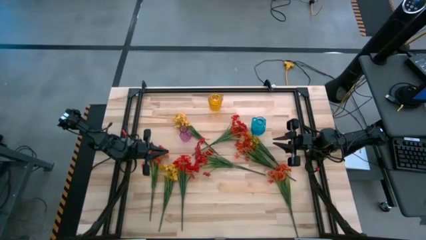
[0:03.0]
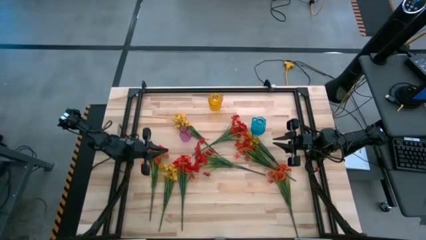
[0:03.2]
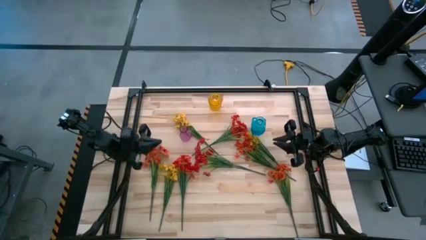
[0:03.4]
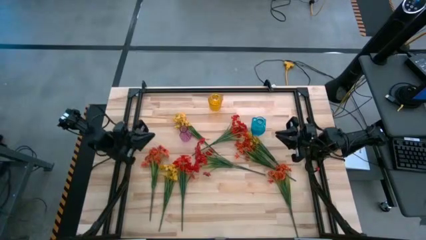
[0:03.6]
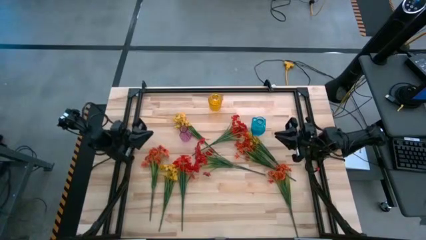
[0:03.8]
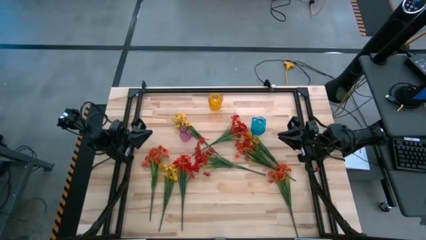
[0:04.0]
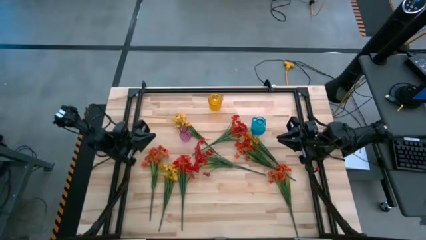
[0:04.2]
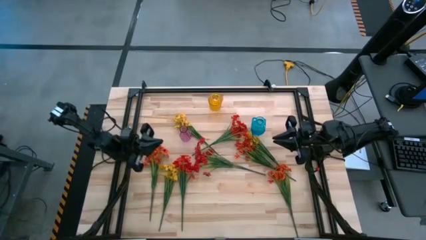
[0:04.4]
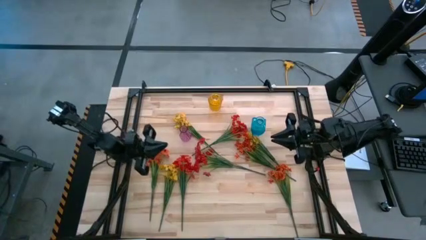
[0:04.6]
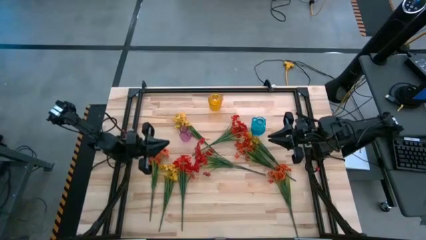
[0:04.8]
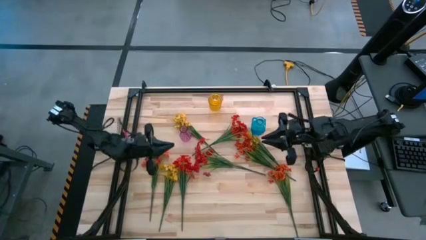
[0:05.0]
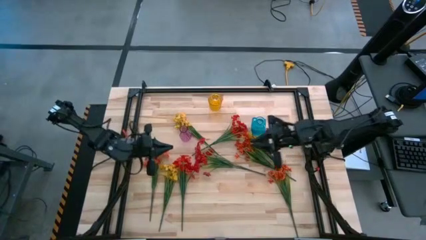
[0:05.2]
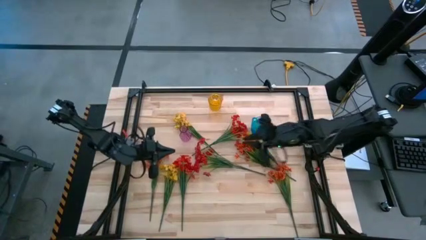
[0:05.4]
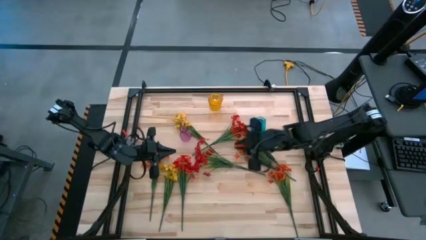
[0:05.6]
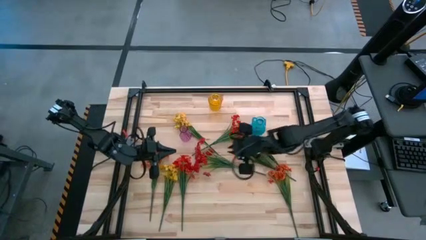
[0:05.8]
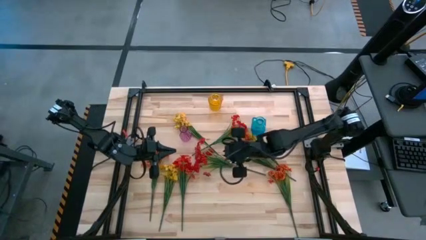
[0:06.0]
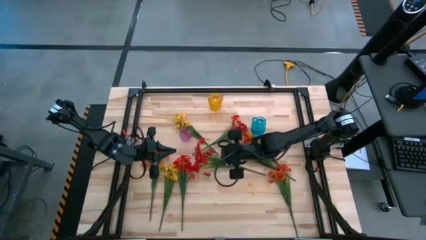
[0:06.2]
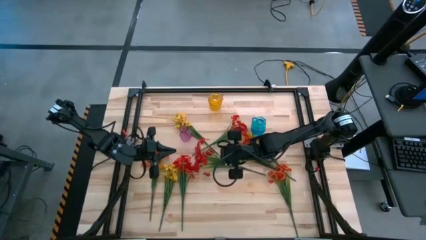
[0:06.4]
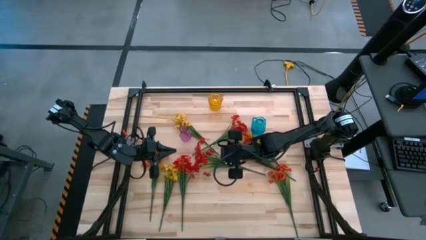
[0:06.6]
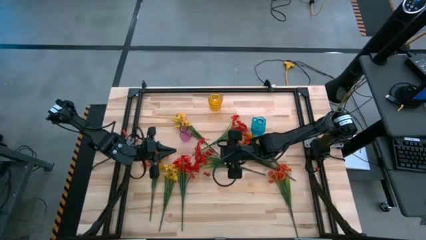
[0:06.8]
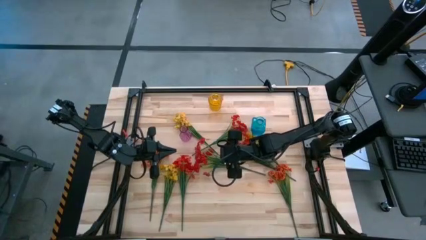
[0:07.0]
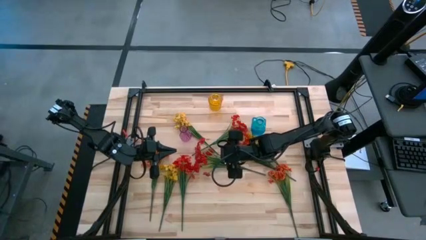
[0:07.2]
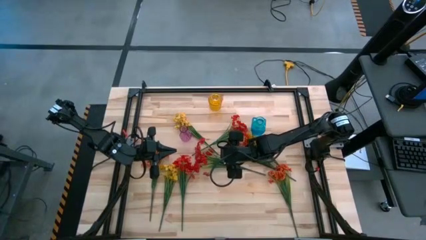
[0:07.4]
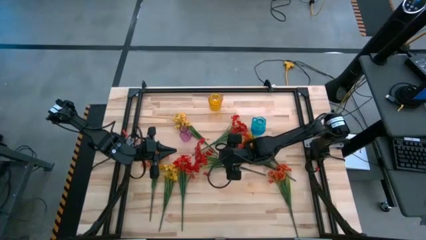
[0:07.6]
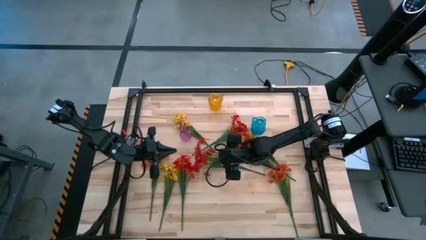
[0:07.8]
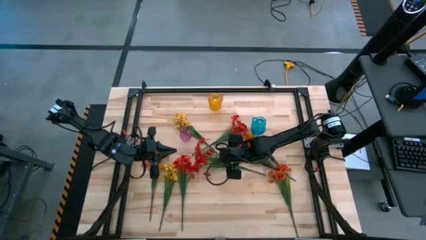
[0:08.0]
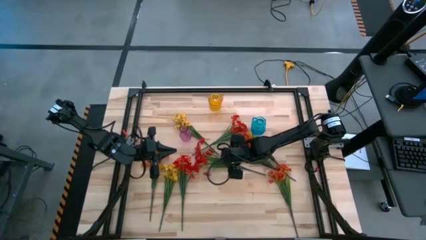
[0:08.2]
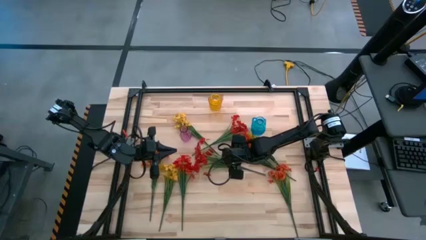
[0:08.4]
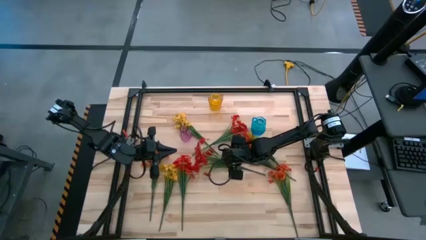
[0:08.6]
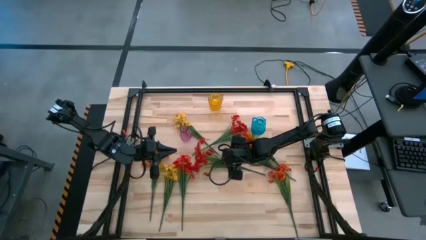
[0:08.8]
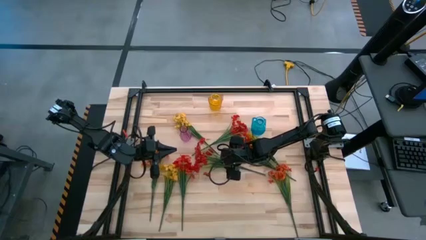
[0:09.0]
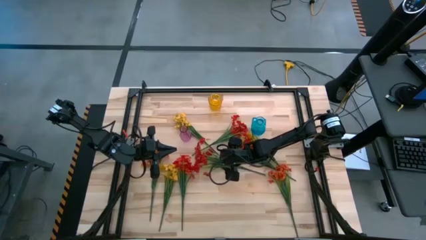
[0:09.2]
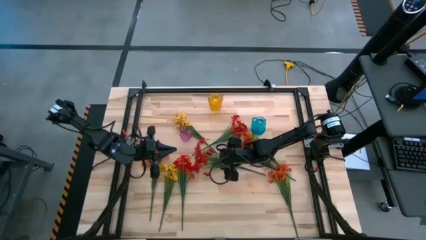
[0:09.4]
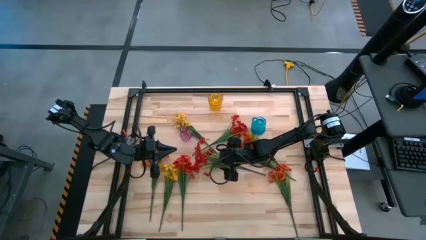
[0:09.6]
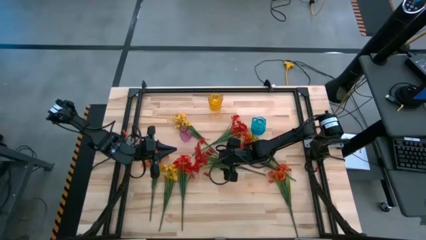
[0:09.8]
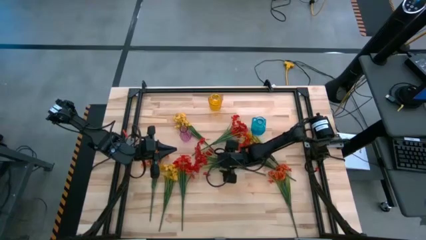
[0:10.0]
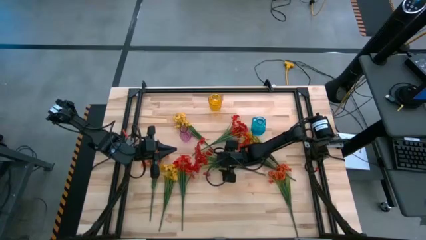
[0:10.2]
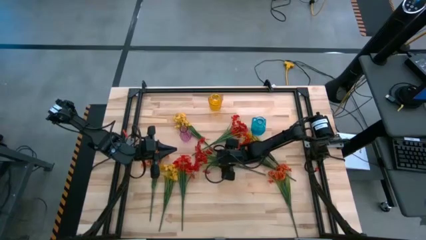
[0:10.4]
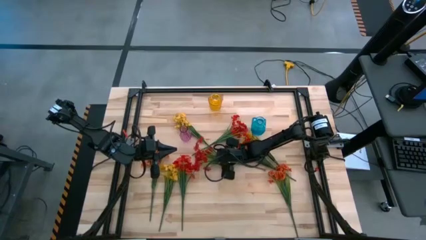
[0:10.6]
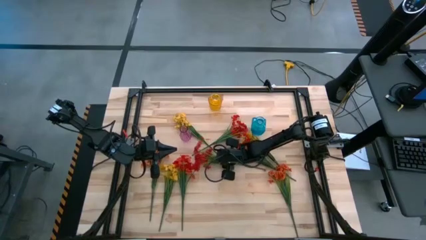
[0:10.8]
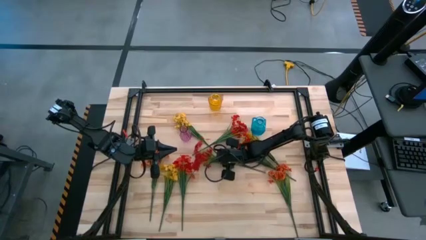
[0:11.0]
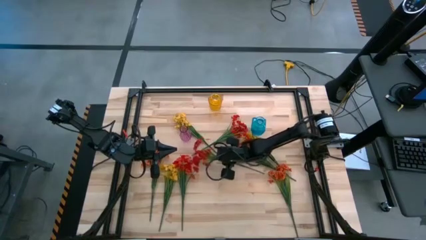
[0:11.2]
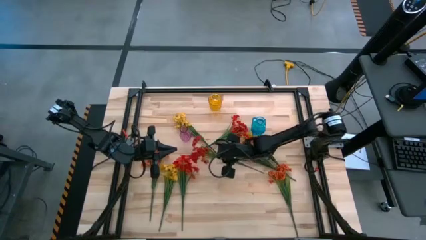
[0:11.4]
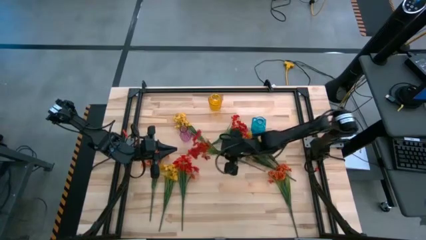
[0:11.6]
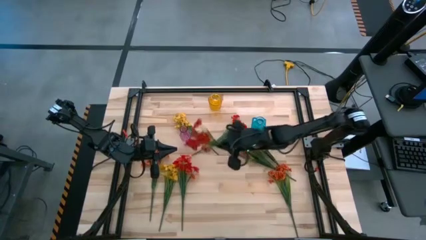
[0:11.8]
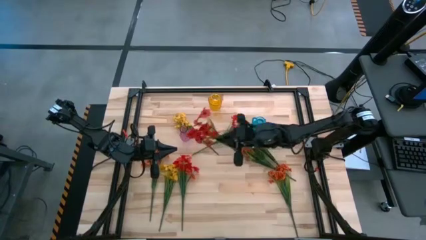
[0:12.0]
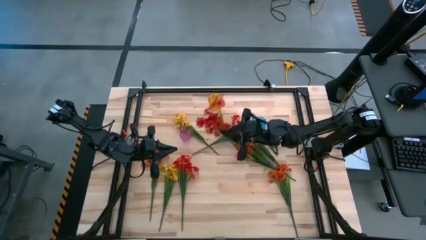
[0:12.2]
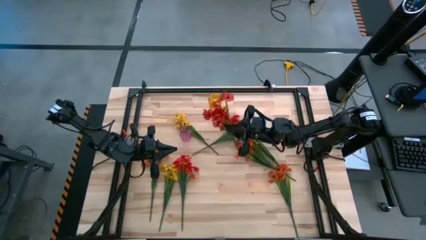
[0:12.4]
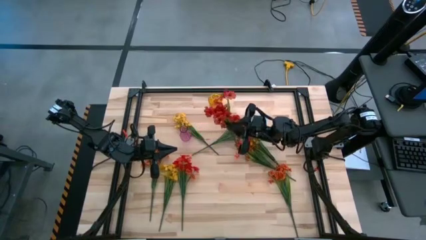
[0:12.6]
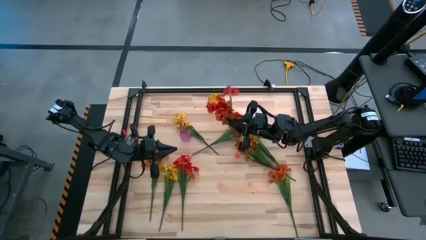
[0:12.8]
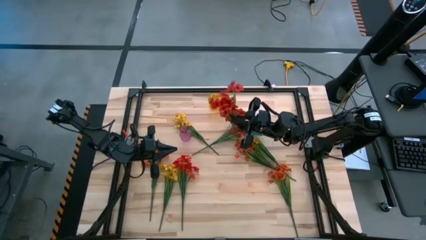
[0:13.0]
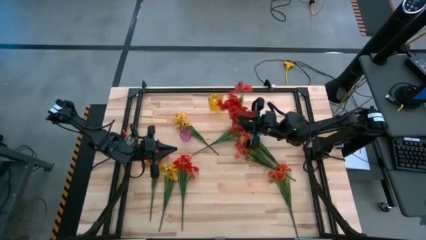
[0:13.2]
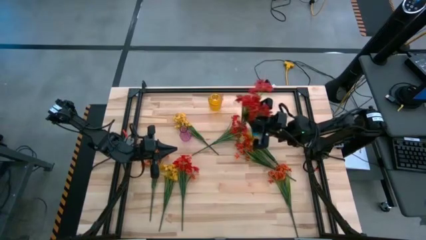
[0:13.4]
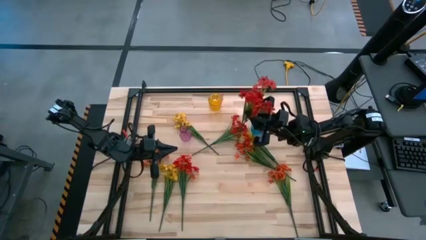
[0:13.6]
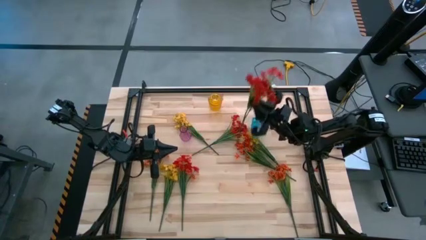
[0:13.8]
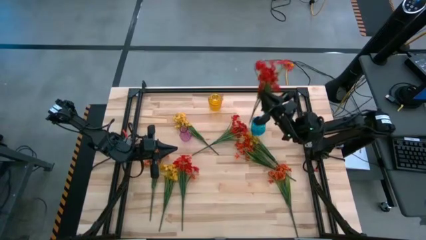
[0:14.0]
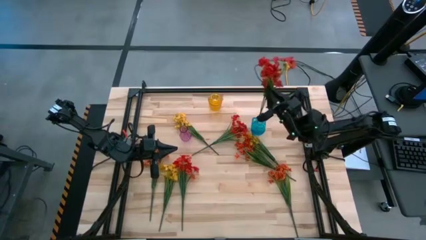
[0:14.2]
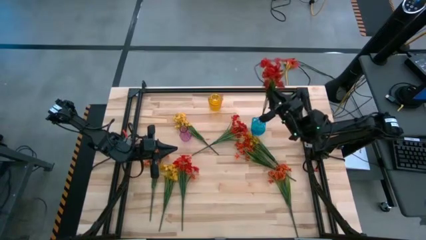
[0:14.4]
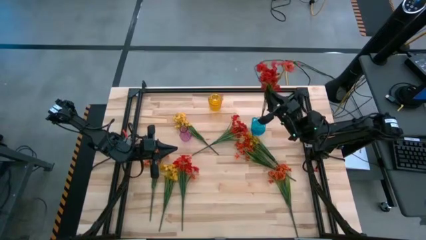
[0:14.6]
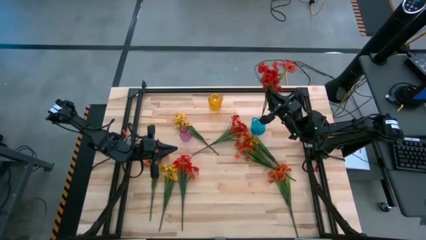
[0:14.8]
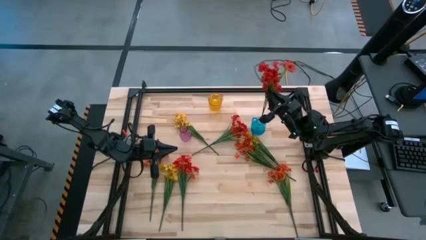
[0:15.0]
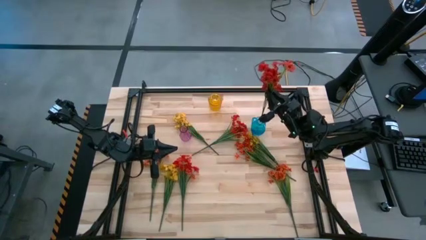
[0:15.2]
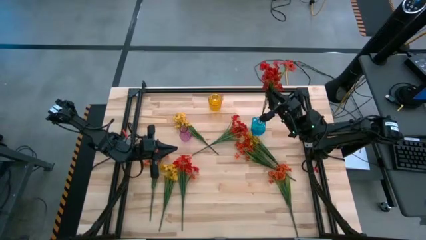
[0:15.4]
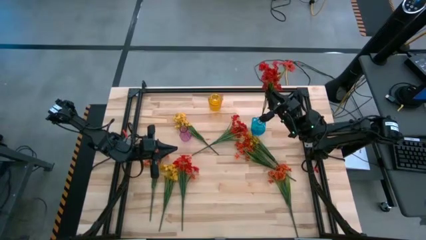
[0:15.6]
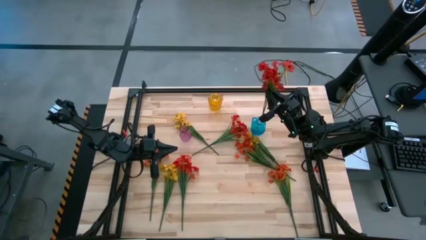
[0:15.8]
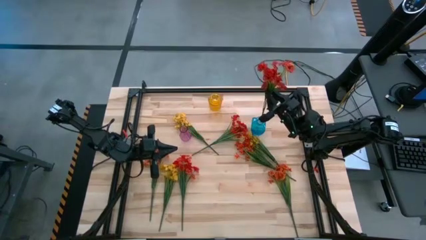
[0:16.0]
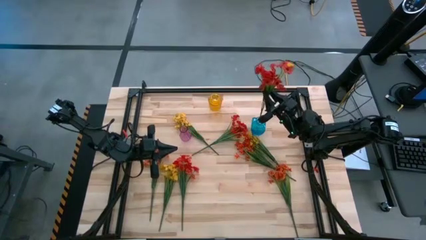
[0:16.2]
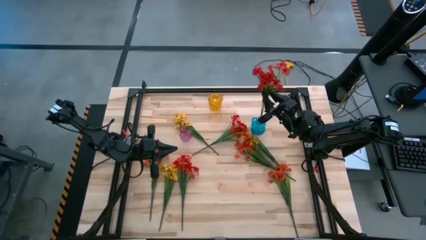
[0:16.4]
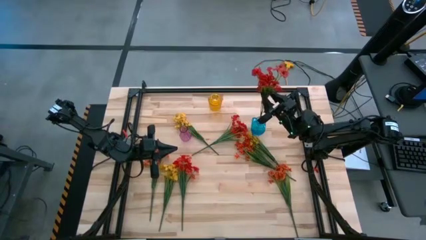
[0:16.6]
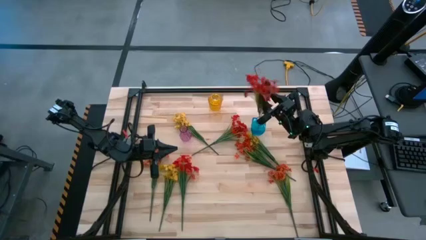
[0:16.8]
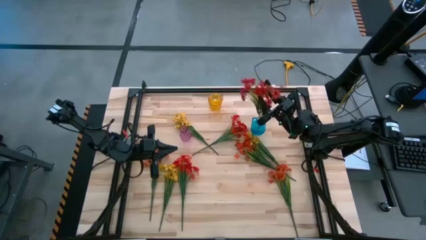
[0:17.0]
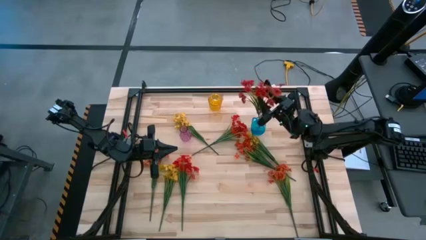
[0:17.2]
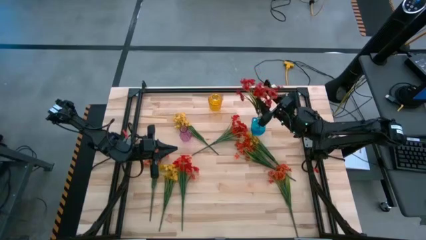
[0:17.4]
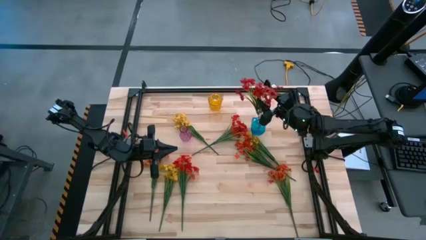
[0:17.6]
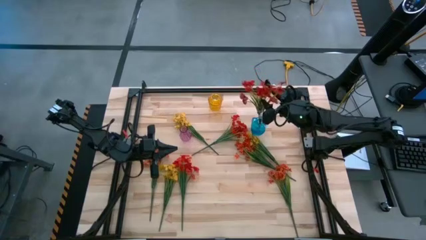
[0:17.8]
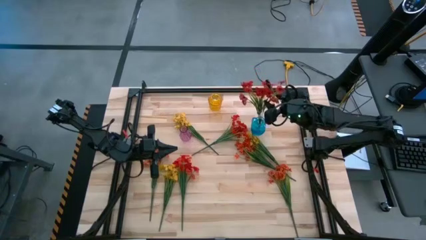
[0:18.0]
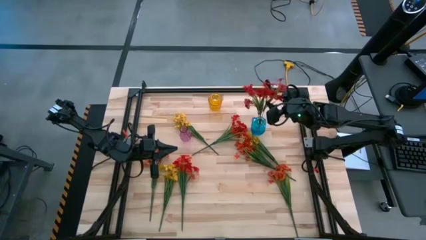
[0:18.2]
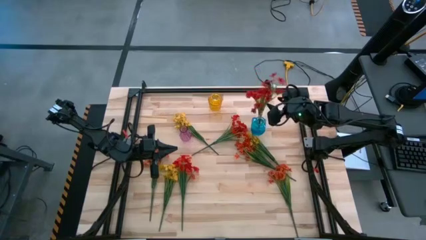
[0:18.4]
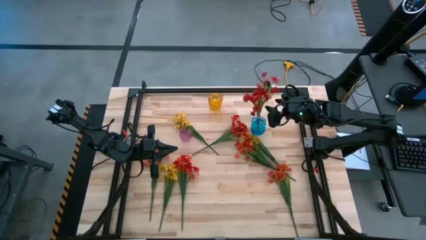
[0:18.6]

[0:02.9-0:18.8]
Task: Sort flowers into vase by color
Put the center red flower into the blue vase
